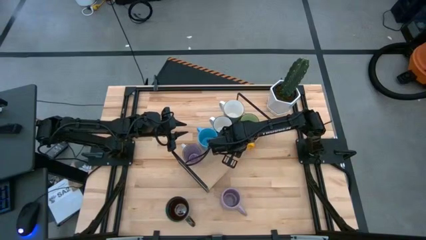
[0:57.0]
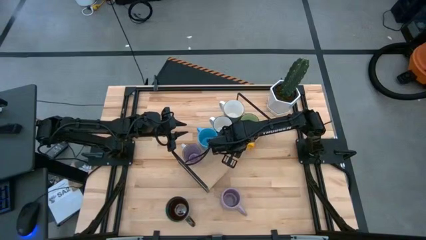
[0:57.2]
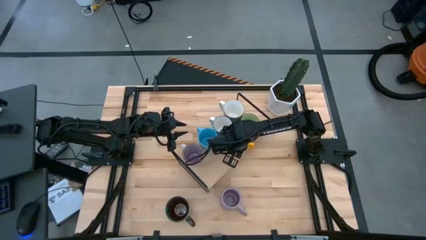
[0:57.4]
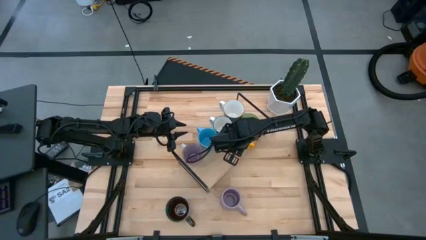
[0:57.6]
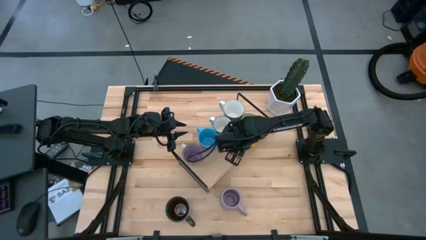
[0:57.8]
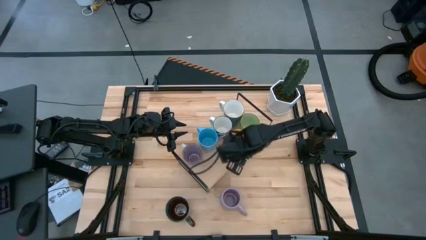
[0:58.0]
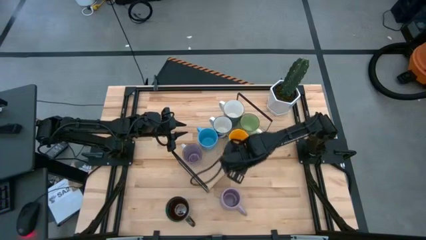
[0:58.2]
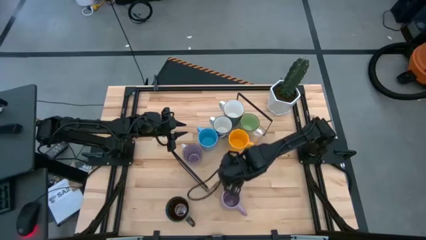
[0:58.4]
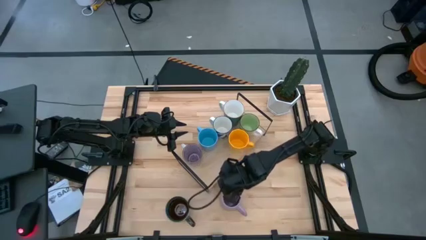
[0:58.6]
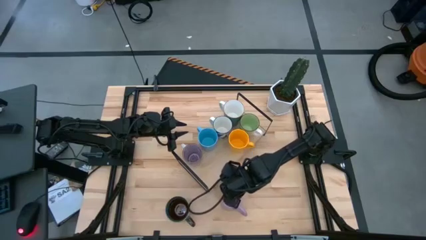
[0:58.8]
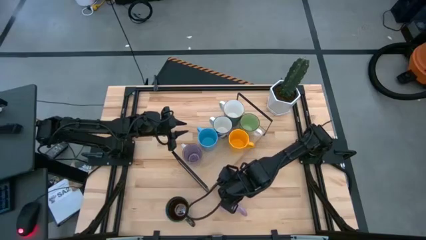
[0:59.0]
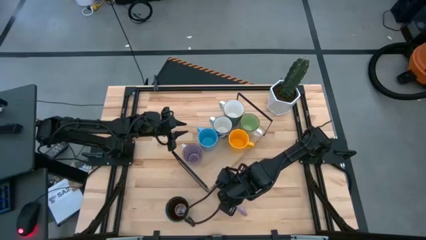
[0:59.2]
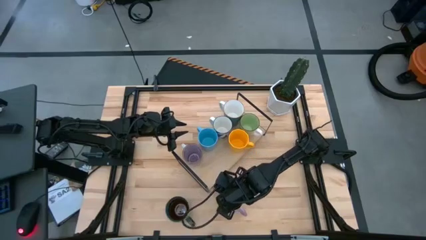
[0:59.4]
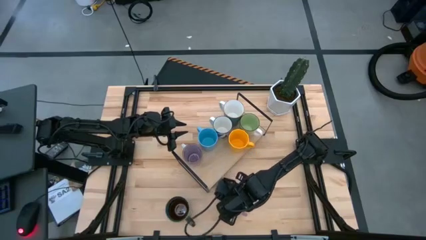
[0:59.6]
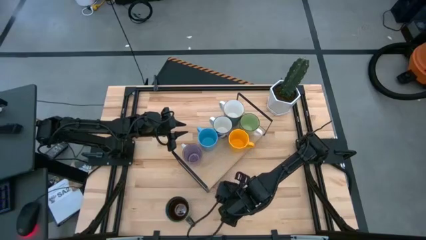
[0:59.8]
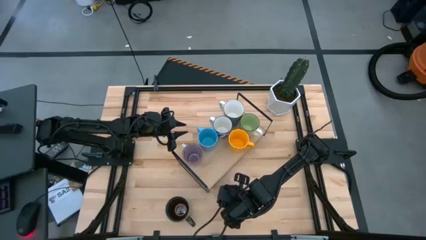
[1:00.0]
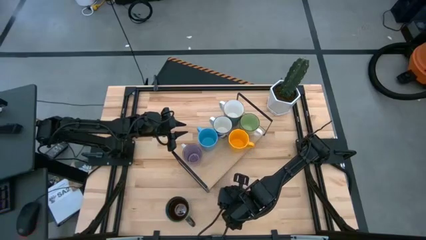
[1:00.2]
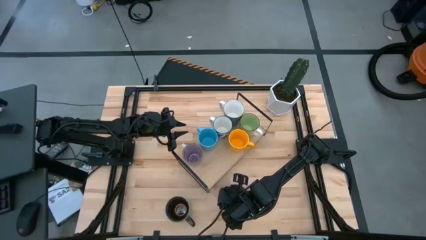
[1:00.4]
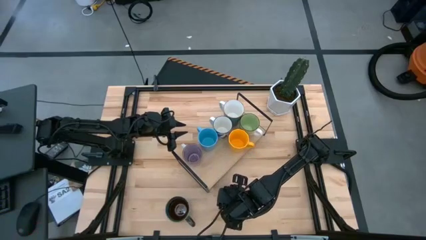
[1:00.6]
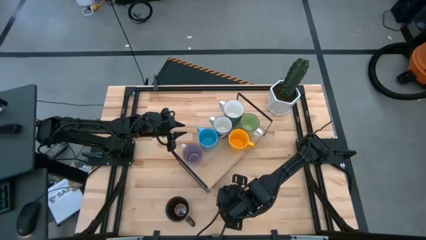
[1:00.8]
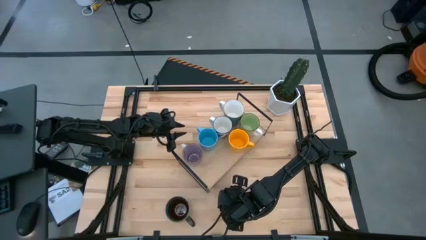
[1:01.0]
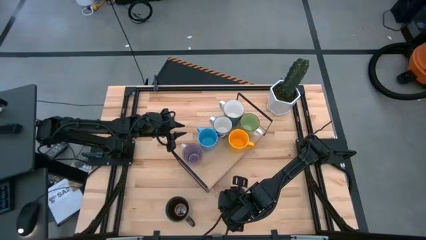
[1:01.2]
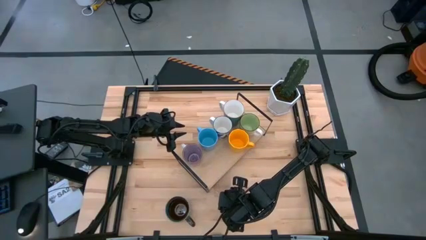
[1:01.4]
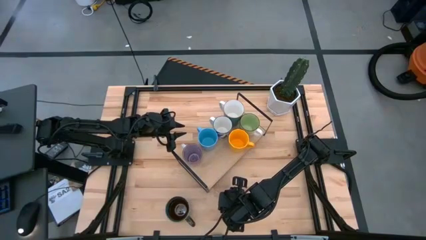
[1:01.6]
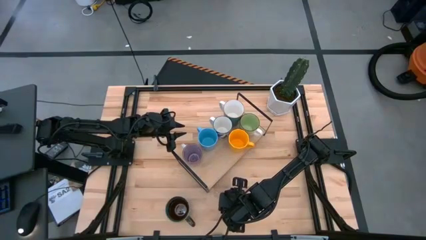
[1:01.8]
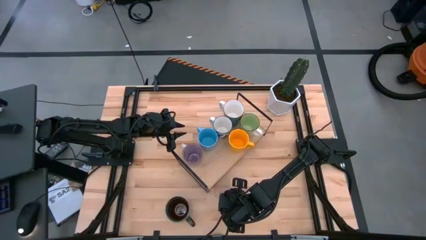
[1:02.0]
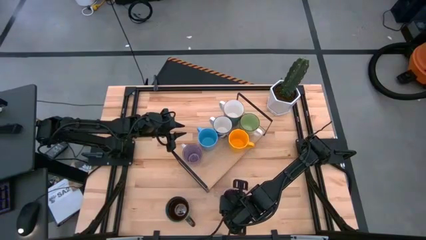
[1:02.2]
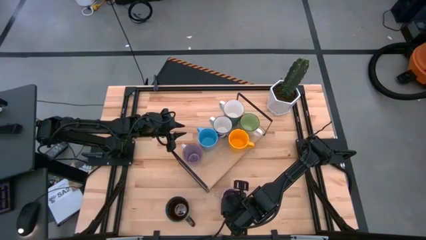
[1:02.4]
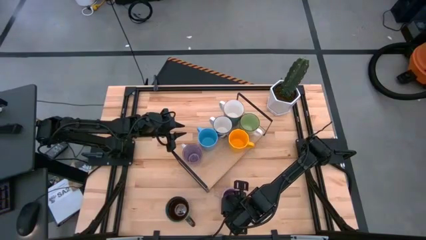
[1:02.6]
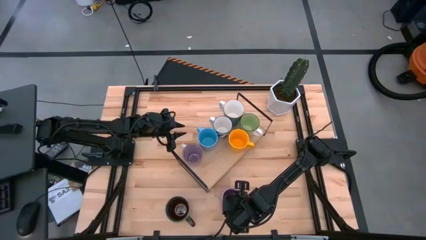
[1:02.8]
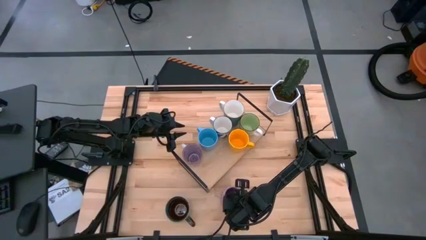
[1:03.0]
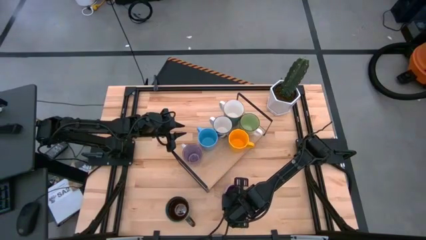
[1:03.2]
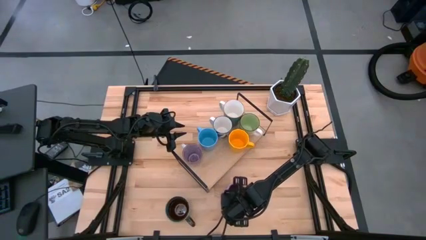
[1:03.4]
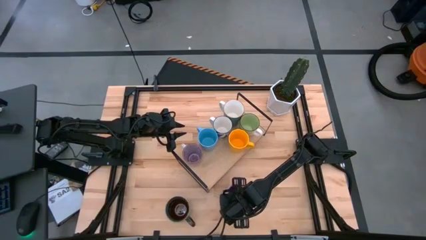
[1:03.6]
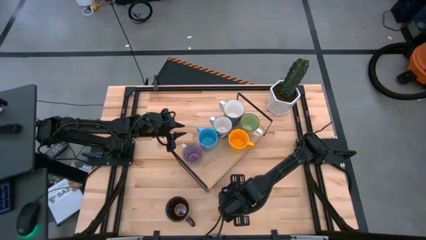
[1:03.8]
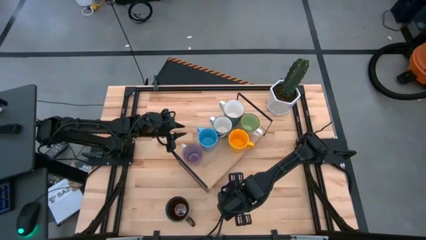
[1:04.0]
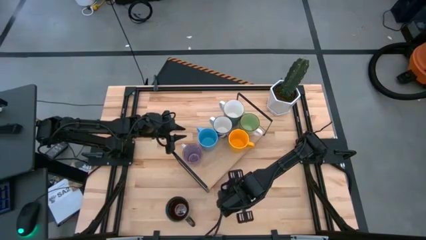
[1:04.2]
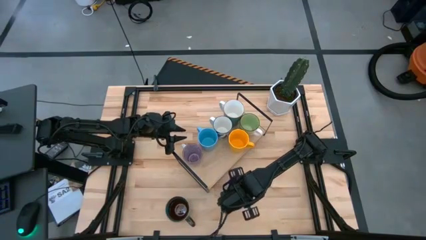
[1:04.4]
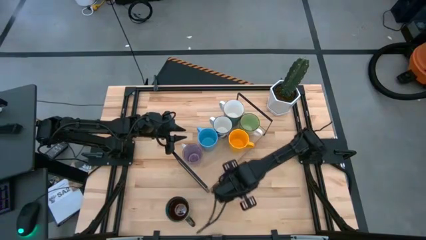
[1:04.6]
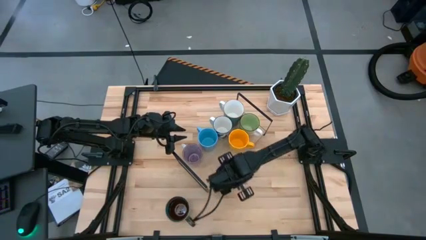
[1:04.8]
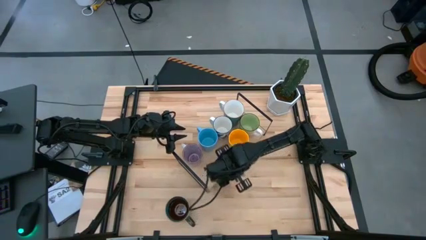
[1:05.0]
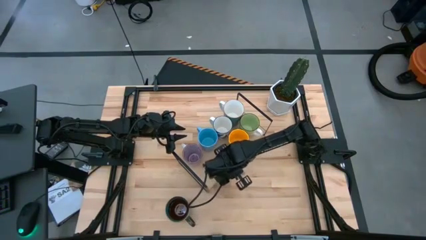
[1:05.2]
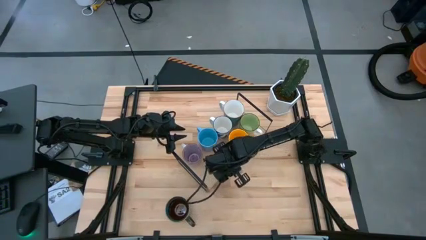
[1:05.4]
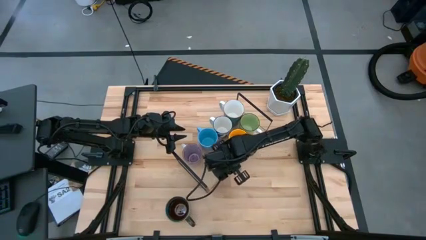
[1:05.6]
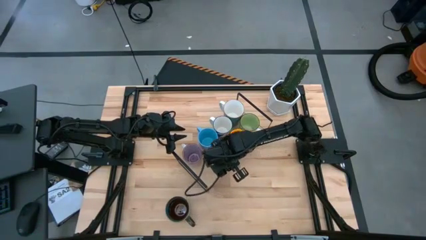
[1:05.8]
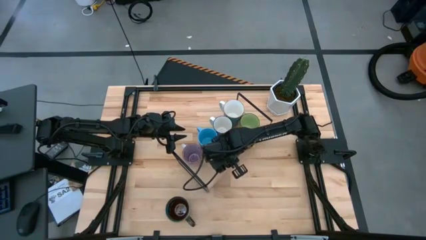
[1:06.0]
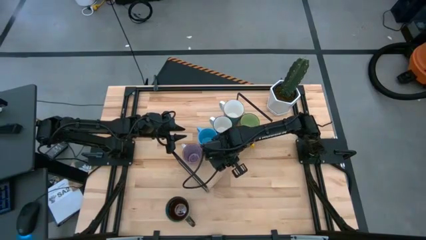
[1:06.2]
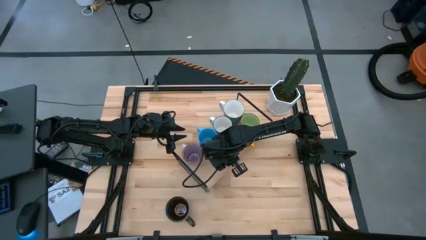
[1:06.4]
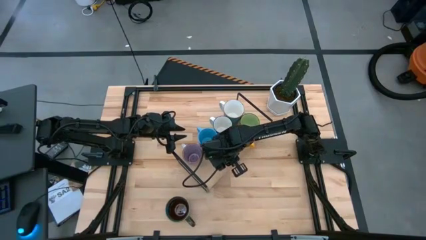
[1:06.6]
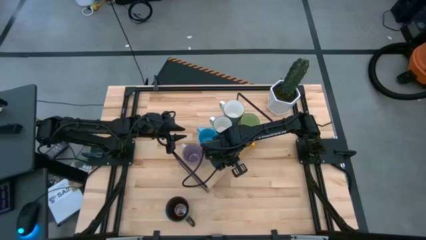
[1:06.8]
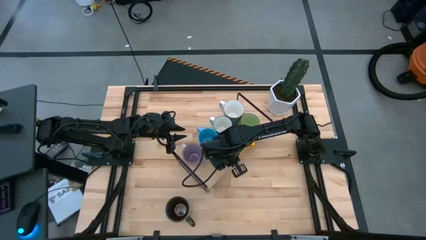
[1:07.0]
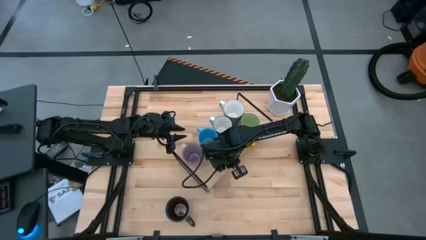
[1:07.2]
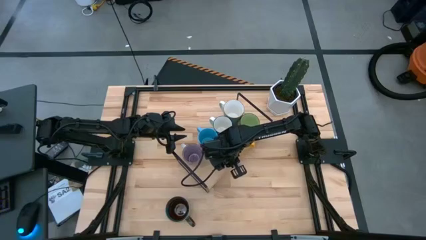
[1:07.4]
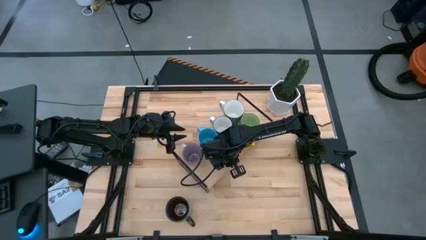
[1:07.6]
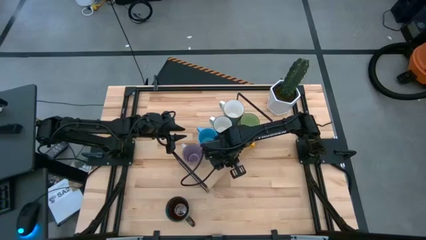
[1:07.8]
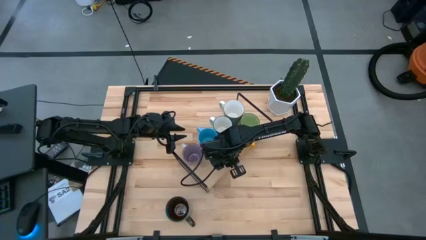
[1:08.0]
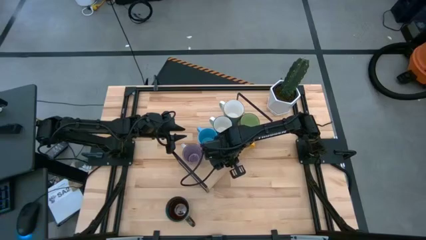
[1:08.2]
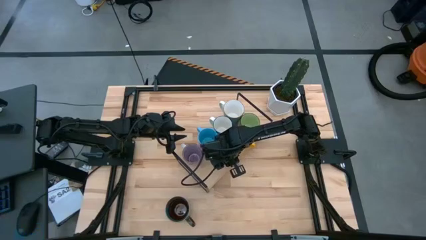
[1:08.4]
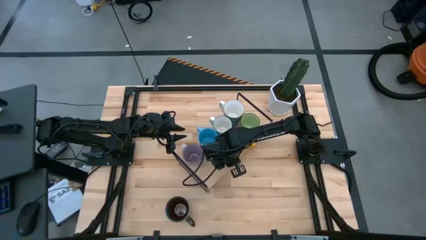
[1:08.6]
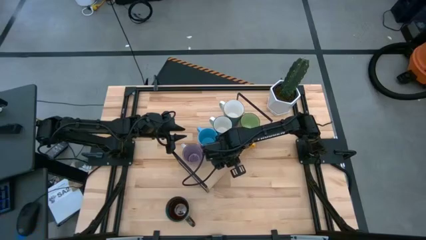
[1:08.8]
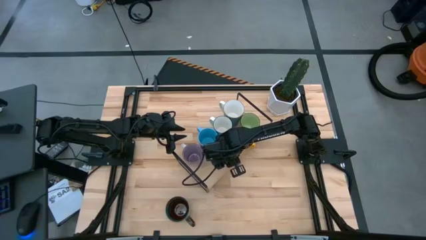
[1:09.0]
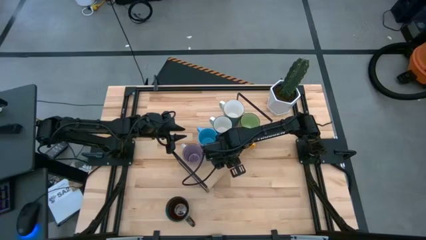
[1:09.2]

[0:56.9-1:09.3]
Task: Place coffee mugs
Put the purple mug on the shelf aligned with the light blue mug
